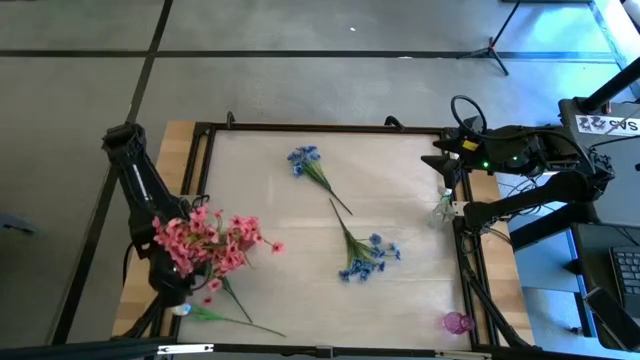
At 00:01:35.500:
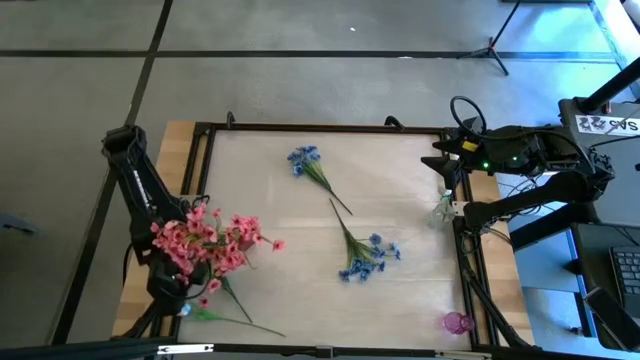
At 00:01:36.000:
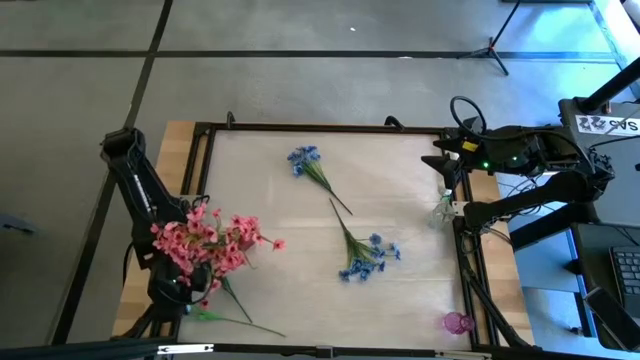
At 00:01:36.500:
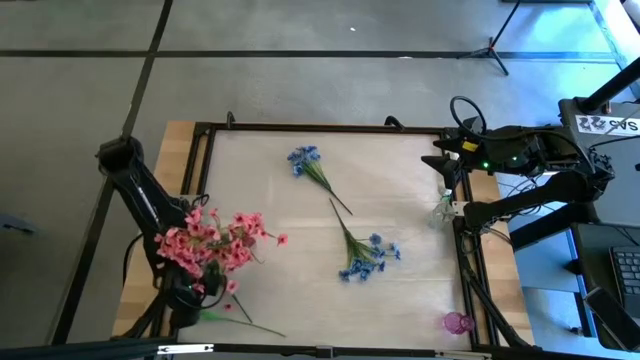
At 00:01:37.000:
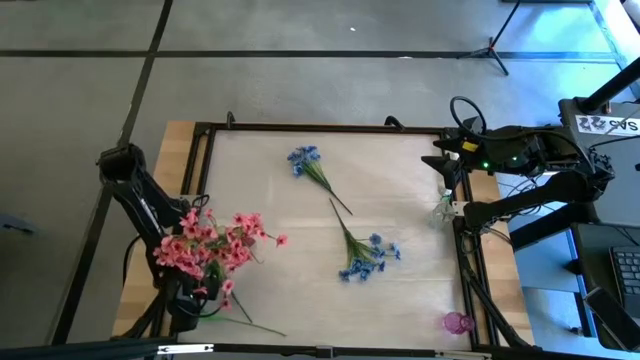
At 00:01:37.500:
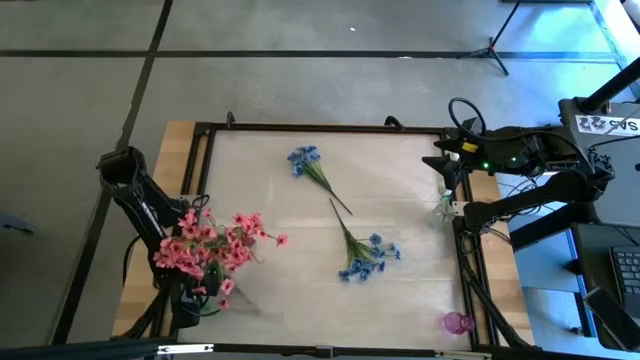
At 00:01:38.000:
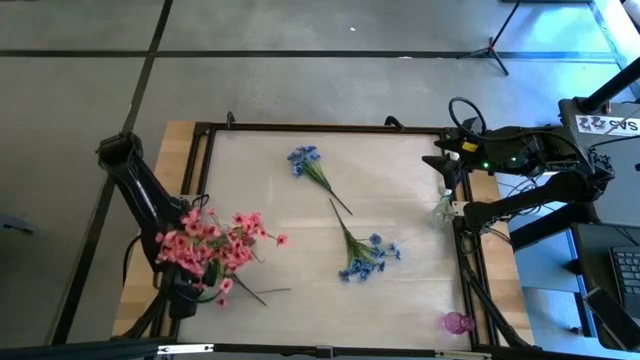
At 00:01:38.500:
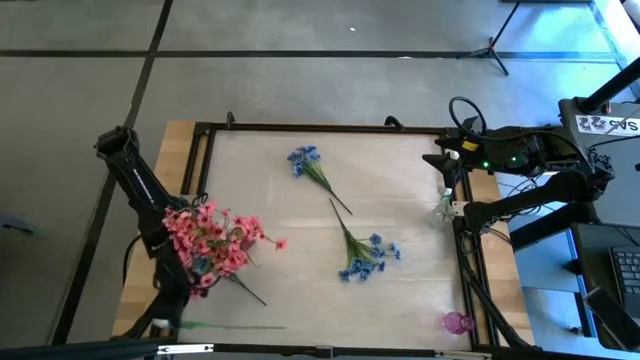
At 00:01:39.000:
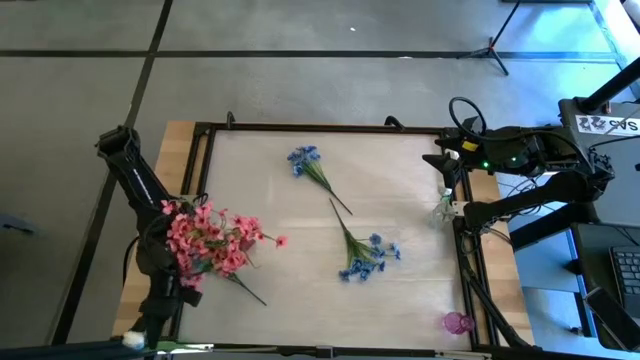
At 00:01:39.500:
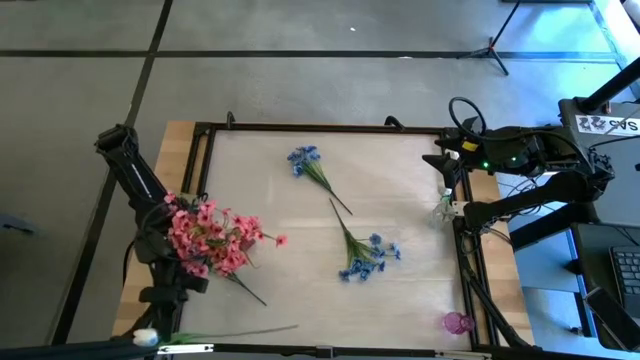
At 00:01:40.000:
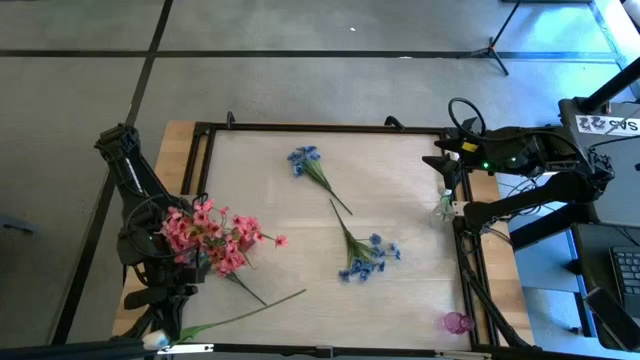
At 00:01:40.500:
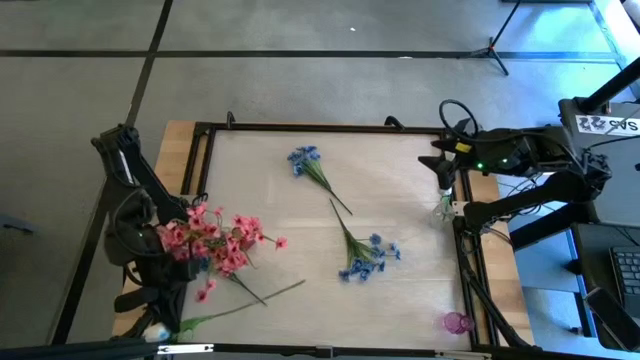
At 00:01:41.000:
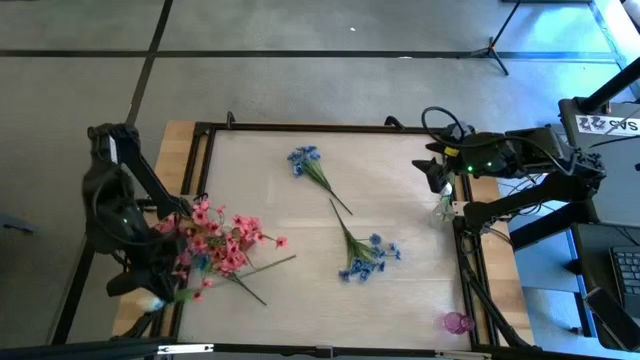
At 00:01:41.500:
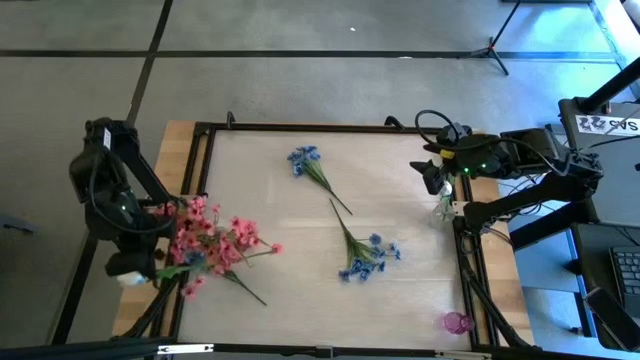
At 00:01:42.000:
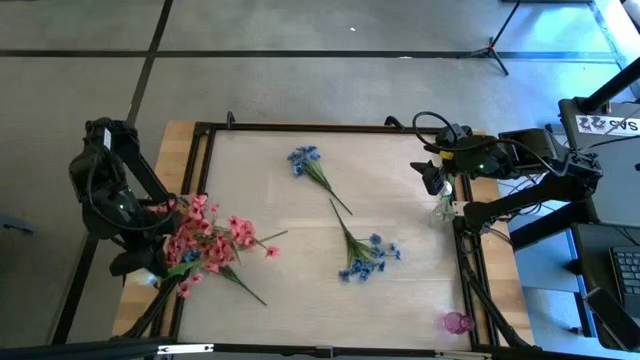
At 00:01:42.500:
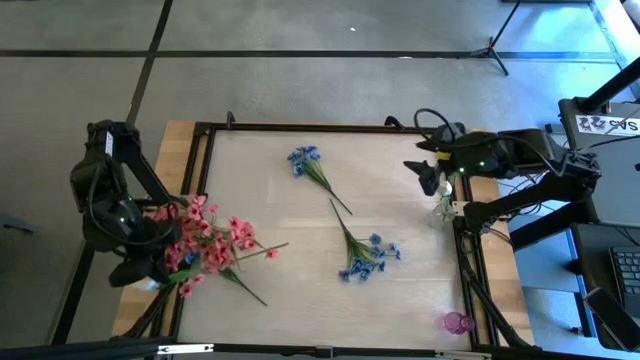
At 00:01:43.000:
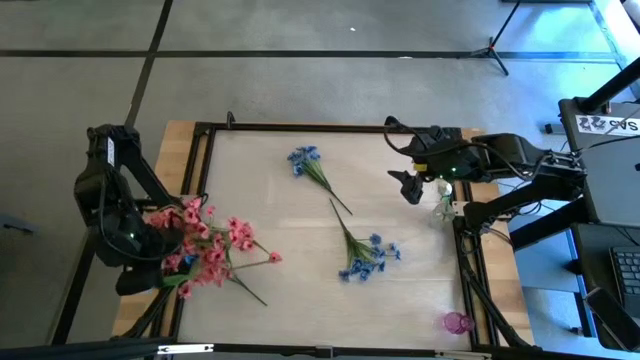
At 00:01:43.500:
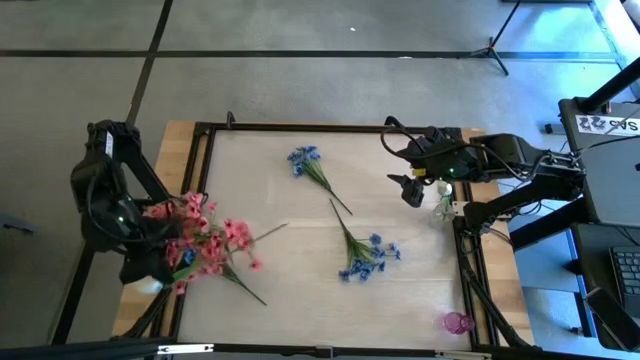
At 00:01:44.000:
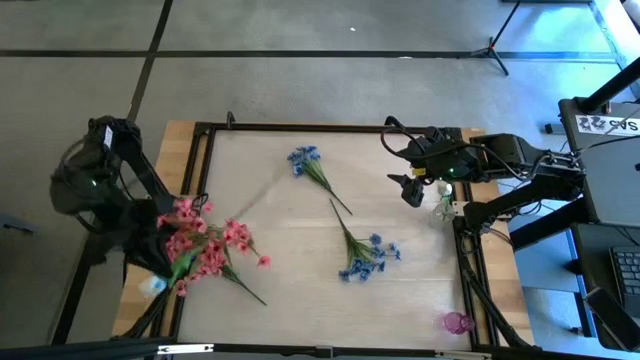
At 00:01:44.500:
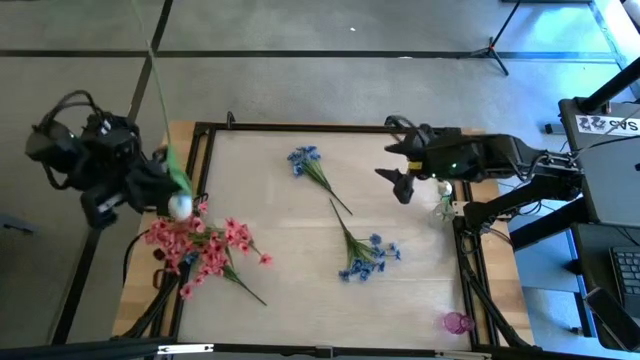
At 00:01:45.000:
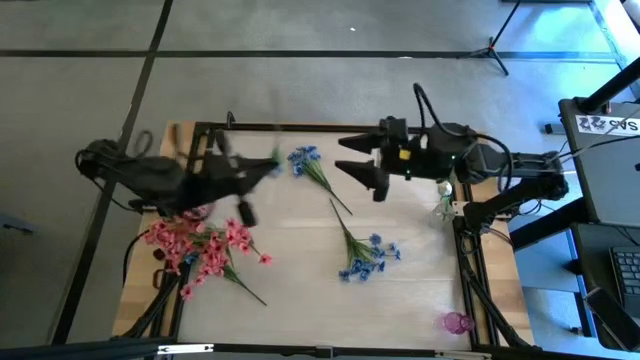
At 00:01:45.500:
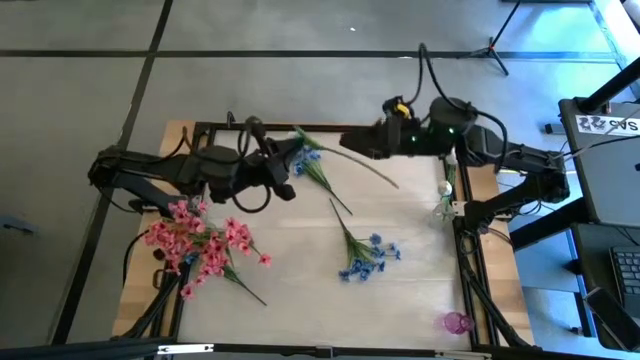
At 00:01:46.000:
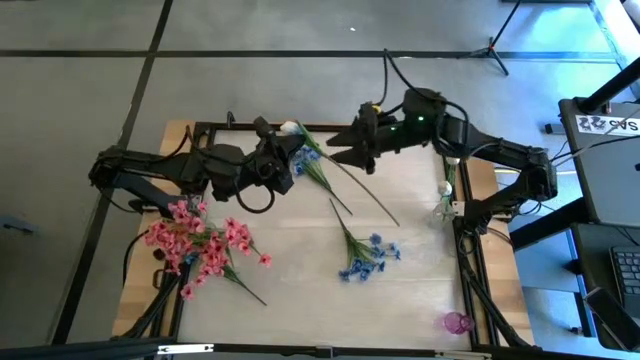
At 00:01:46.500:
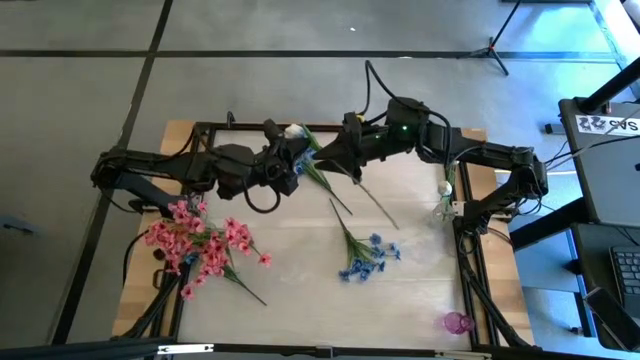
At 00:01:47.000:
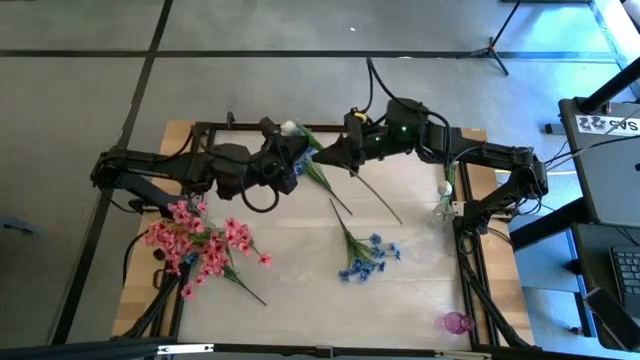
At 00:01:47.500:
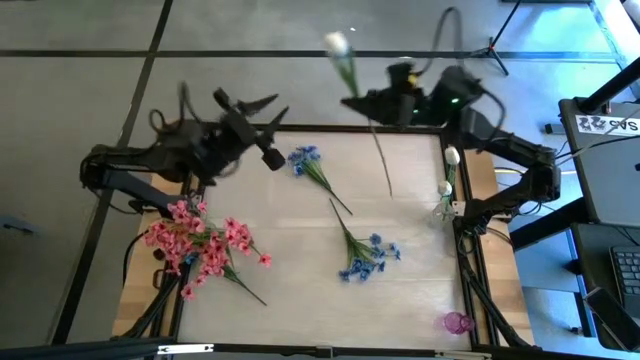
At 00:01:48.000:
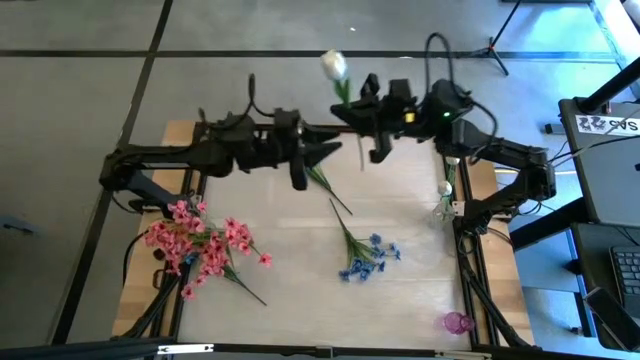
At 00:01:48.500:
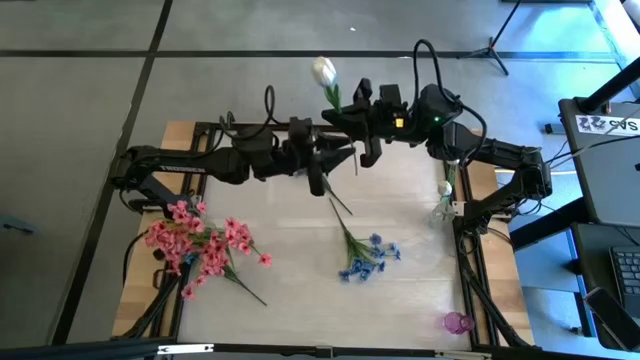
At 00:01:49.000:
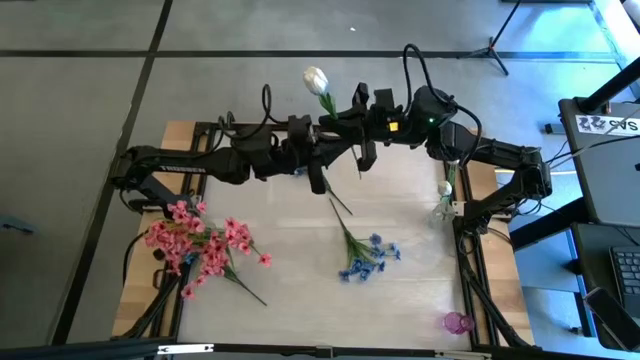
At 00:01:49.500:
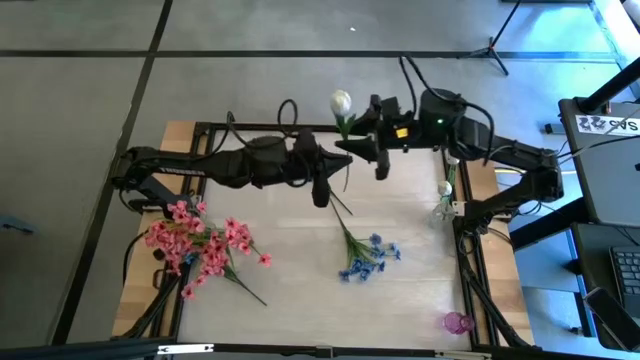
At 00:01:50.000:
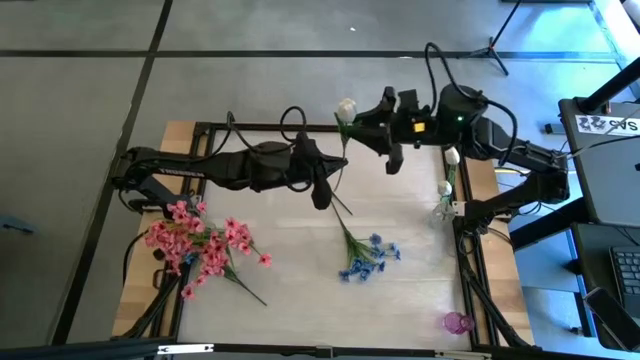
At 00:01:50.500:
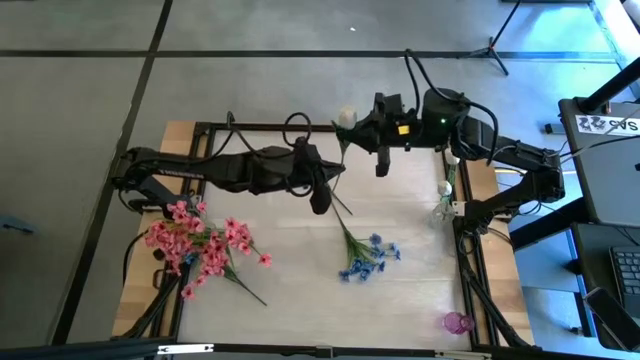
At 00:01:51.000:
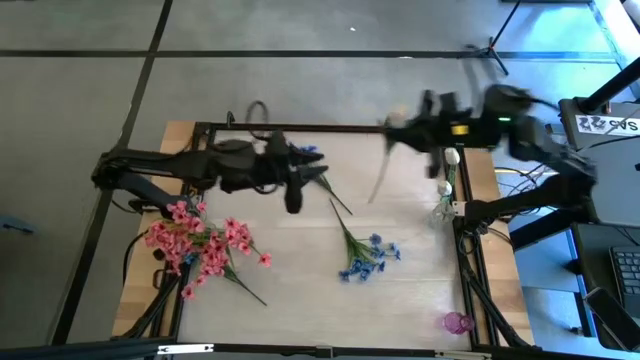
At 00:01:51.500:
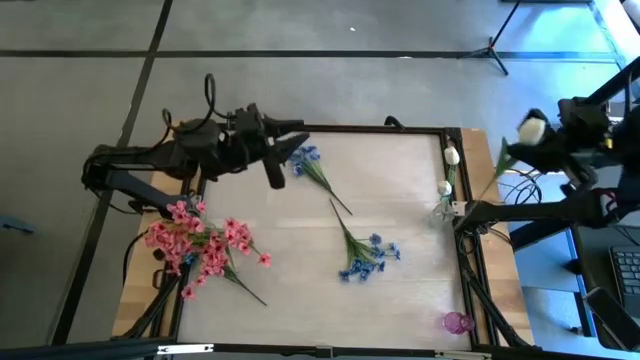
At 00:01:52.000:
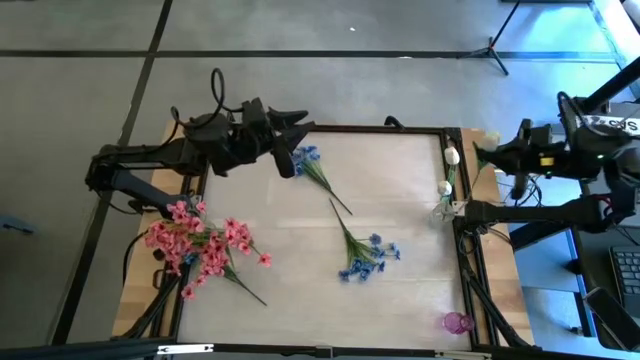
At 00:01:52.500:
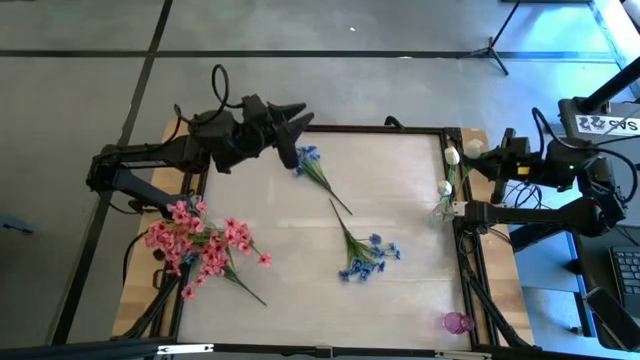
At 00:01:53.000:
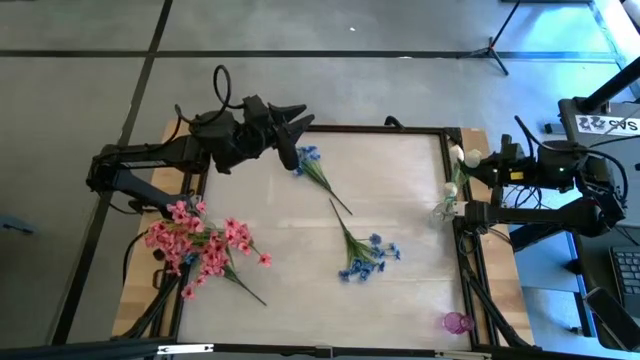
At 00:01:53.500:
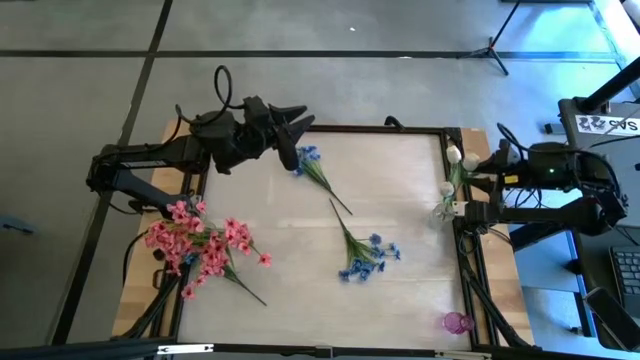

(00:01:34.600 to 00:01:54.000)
Task: Sort flowers into vase by color
Put the white tulip into the transparent vase
